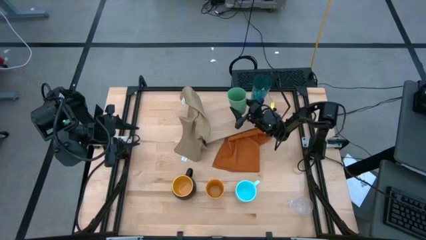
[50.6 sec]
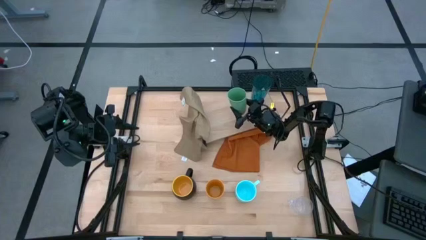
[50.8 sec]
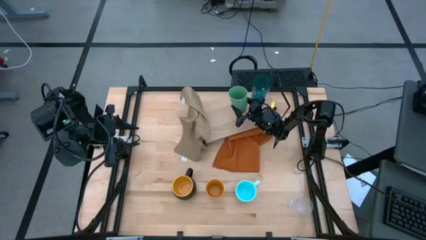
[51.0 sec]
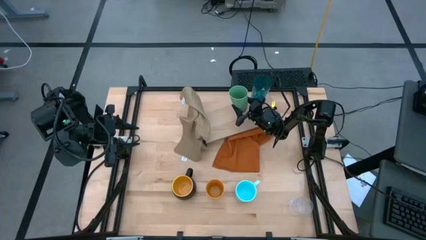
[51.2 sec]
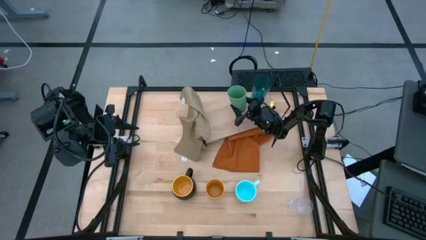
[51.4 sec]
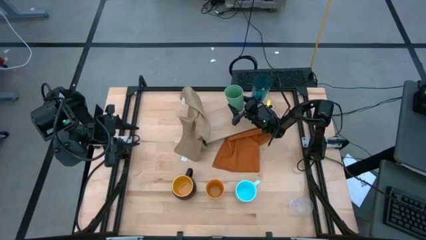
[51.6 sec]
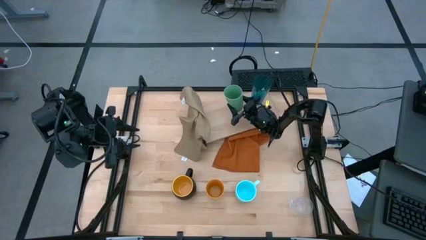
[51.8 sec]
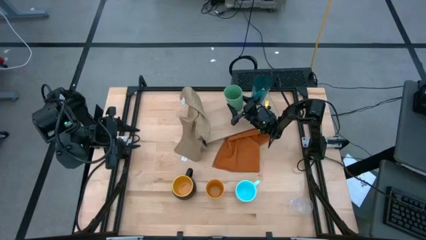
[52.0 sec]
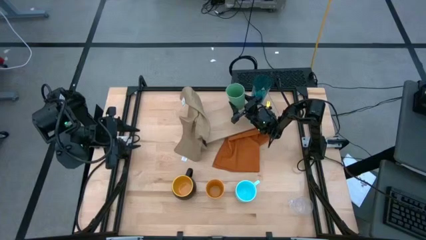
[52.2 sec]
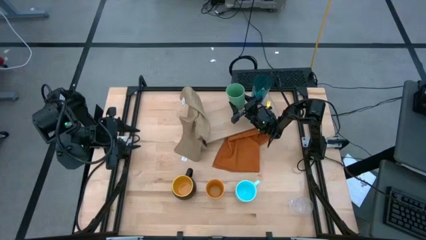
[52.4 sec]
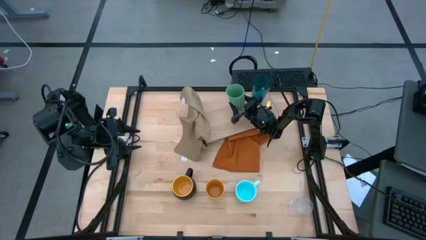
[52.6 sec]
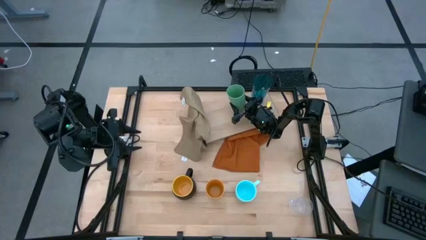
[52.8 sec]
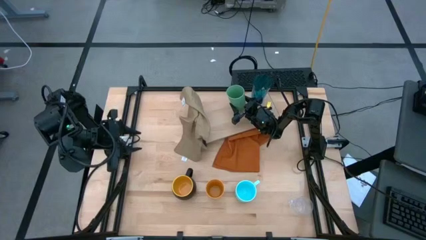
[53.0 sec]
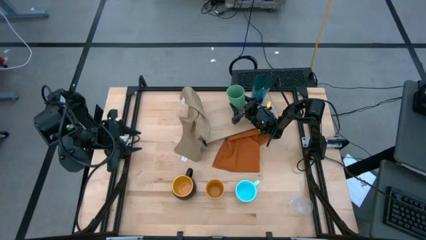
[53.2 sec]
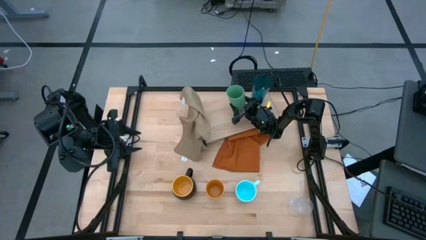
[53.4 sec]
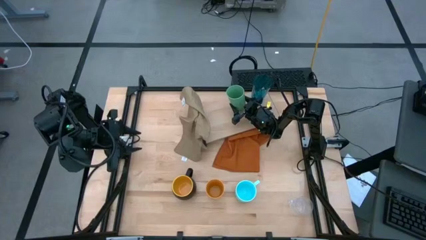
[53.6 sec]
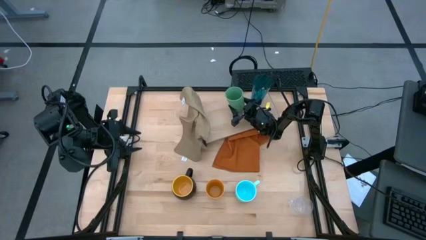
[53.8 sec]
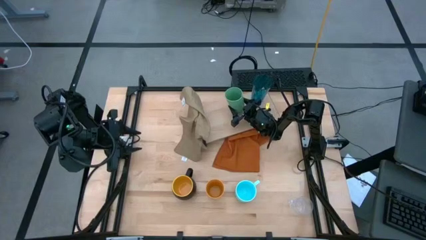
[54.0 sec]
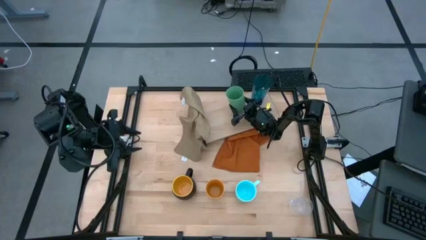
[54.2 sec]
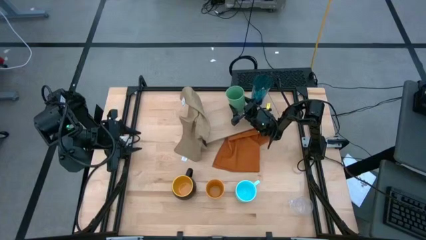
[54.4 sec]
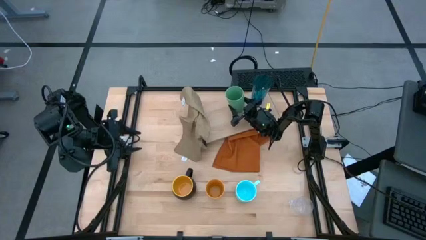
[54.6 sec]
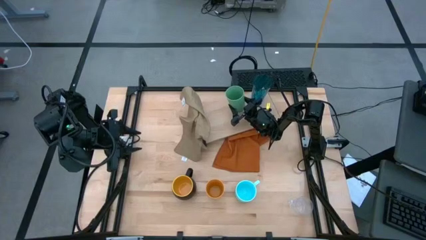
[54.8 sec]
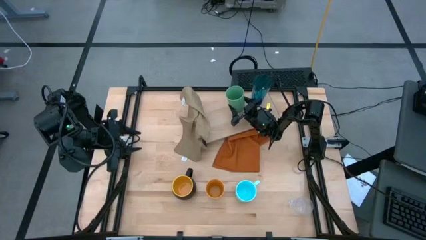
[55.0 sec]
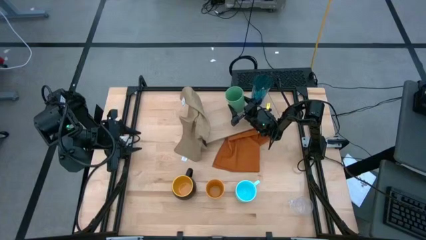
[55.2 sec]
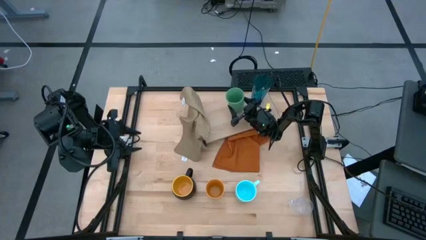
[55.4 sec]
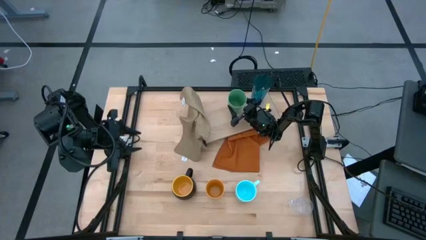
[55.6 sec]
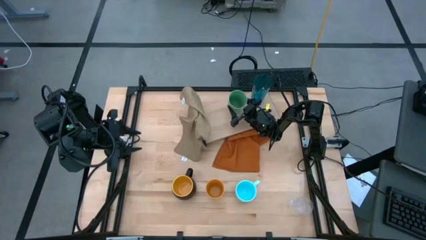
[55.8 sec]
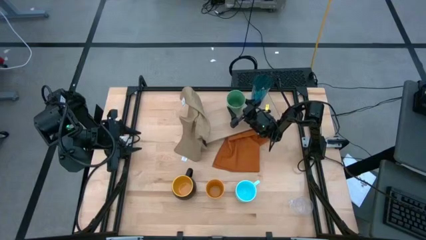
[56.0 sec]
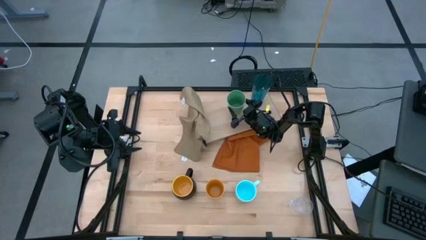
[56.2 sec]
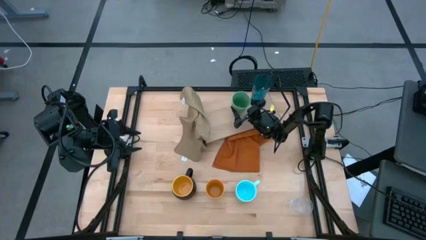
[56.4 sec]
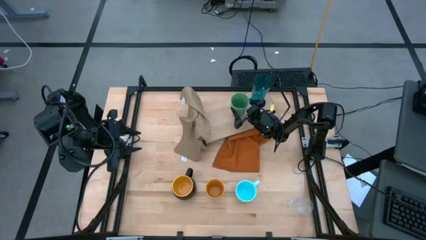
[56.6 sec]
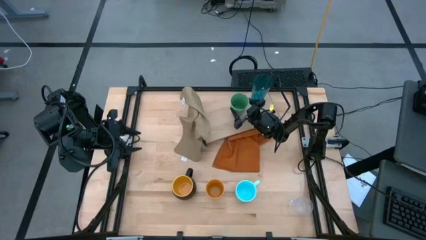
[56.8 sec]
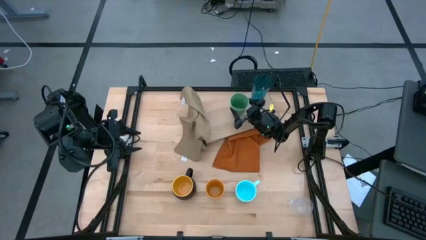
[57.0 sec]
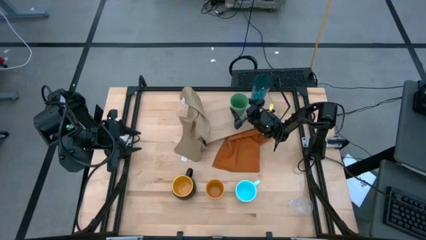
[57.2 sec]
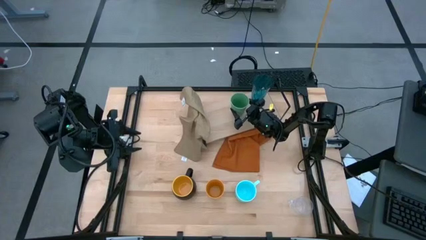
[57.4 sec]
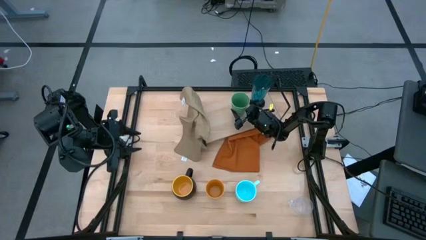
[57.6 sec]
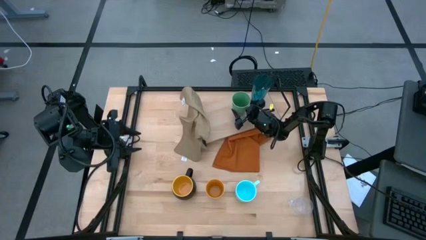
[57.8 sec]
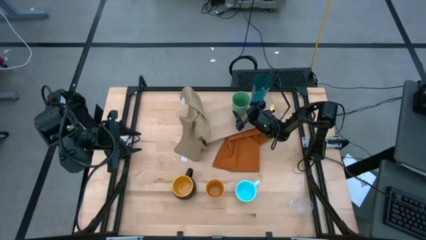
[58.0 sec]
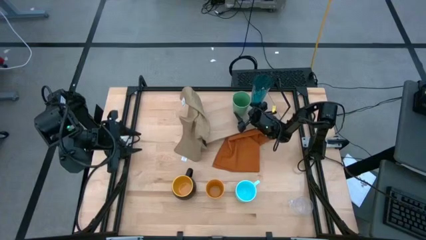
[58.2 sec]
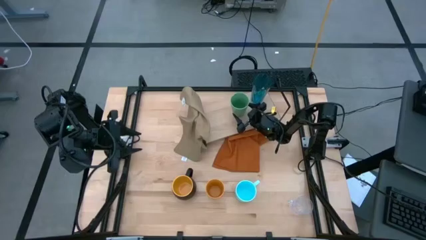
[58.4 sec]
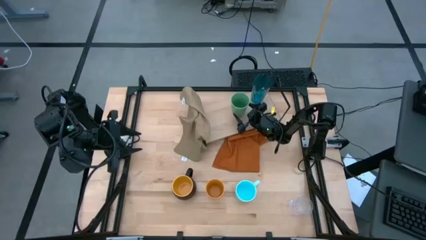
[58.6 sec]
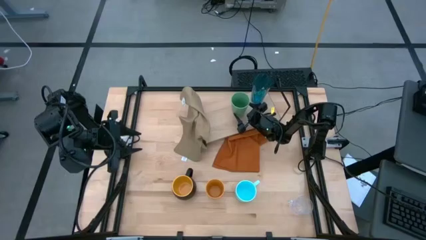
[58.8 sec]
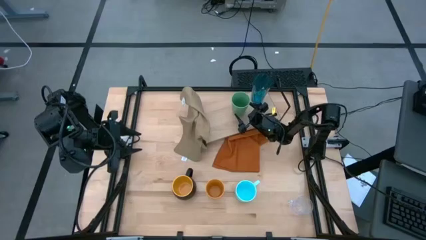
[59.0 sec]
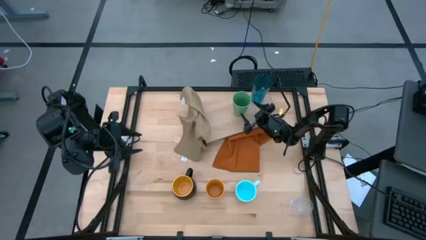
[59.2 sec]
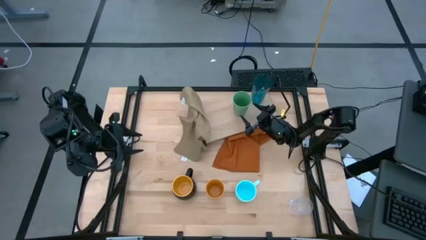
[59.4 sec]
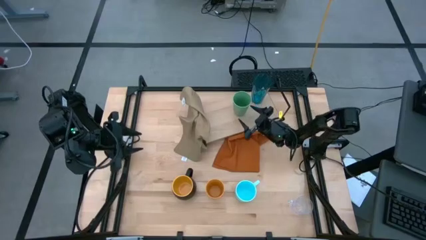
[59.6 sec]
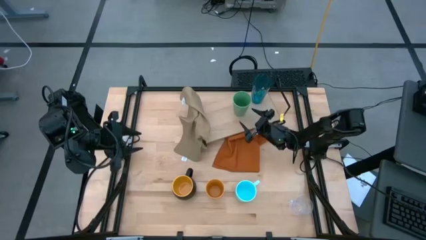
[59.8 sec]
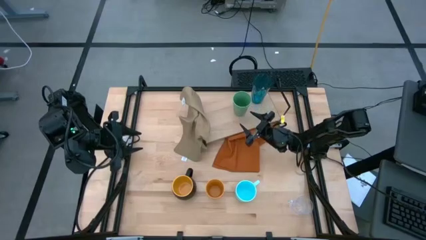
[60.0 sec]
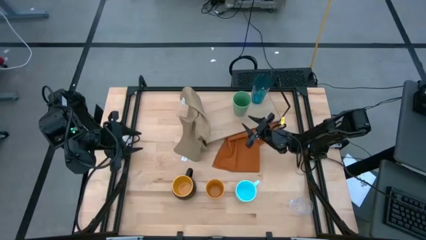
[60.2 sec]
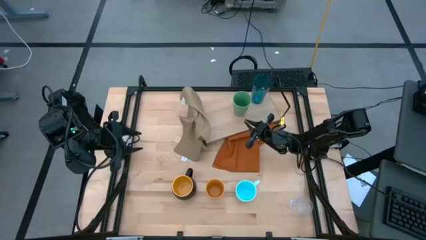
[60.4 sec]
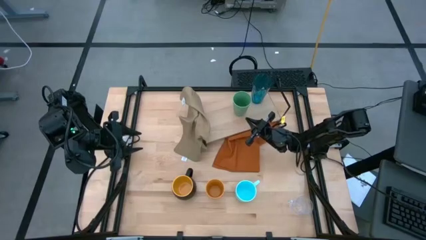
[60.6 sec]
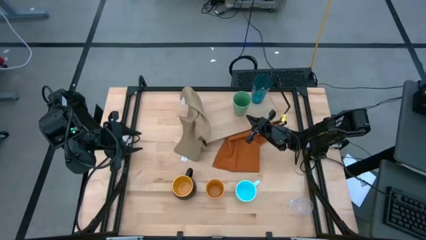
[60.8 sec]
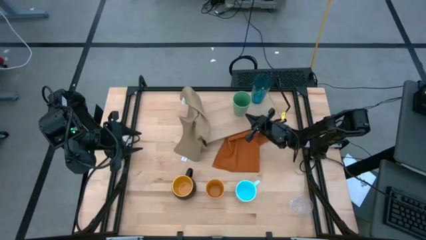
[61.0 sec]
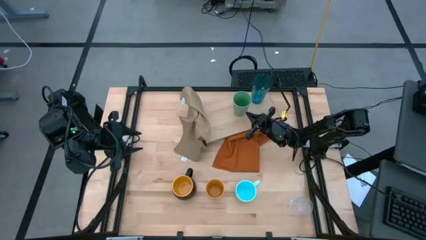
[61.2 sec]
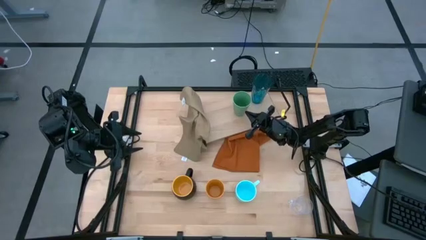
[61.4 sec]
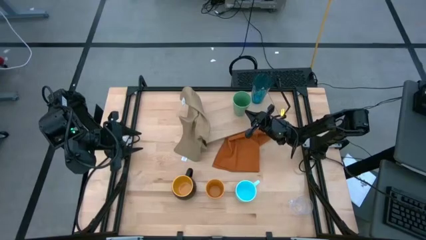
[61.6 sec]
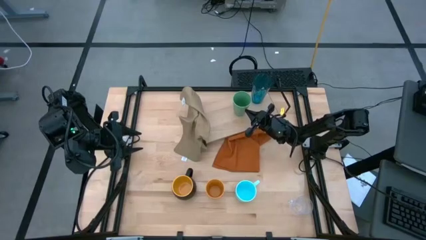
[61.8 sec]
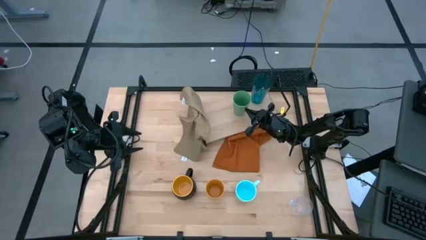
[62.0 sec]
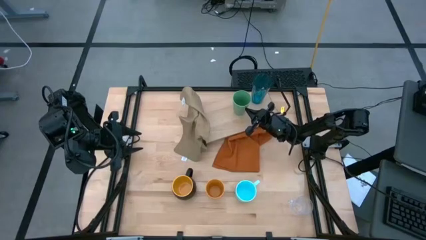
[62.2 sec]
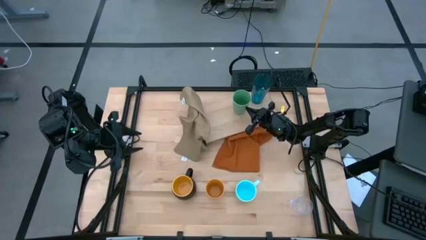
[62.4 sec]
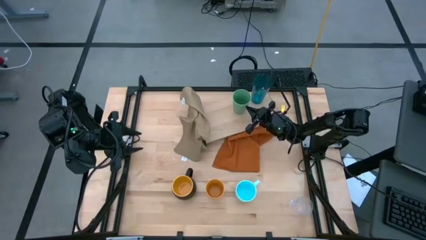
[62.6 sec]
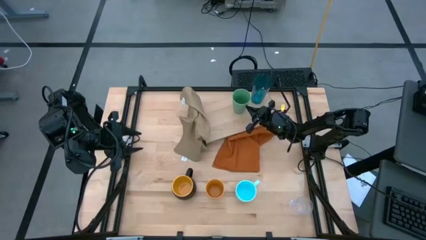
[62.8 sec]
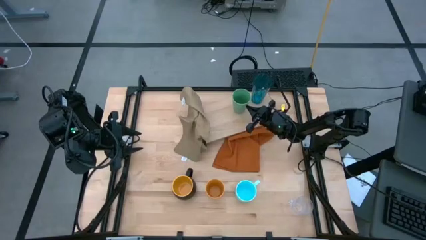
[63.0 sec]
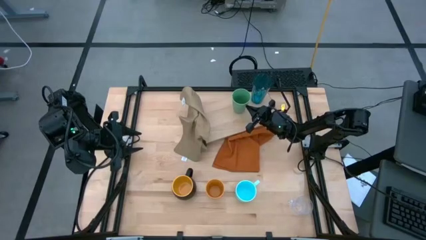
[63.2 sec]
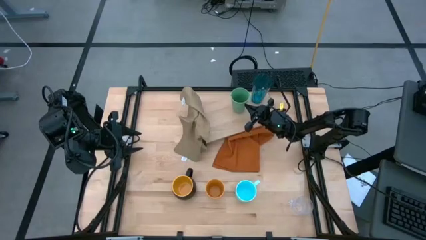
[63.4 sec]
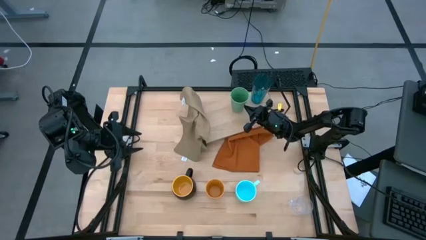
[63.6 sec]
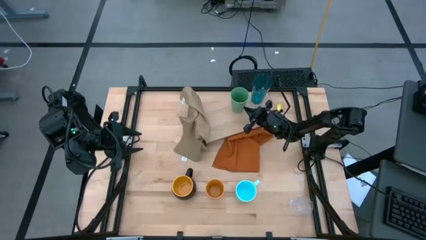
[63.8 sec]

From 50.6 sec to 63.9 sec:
Task: Stack small to large cups/mugs on shelf
Put the green cup on the shelf
